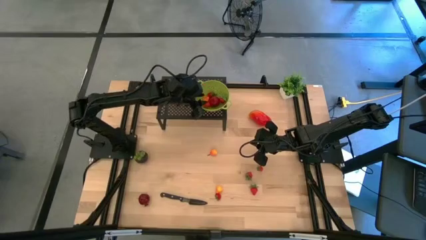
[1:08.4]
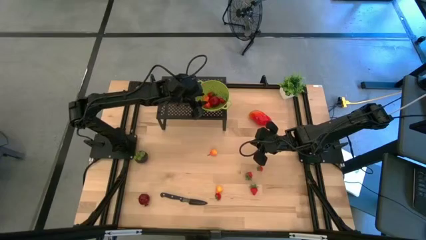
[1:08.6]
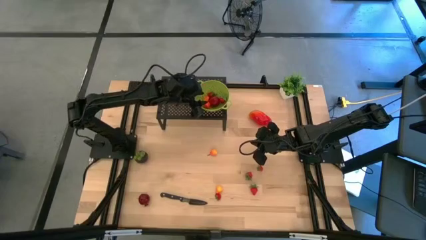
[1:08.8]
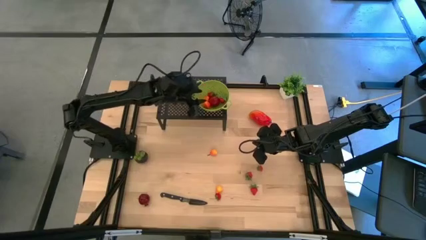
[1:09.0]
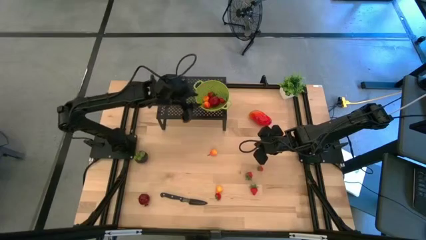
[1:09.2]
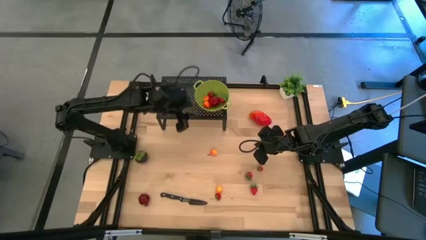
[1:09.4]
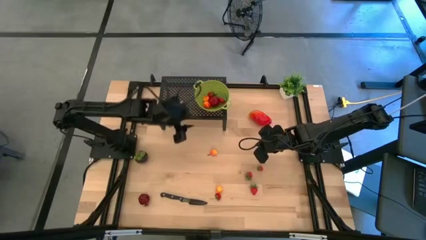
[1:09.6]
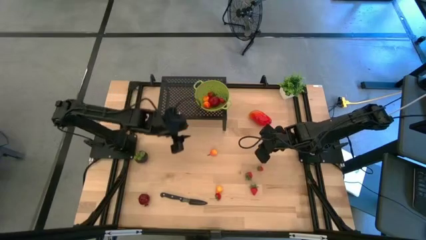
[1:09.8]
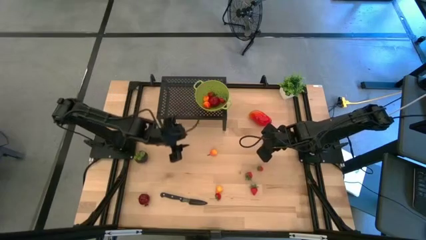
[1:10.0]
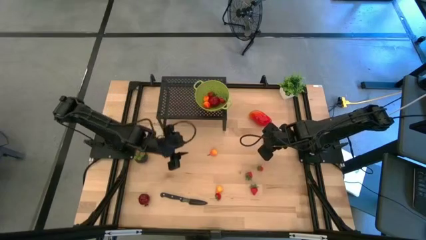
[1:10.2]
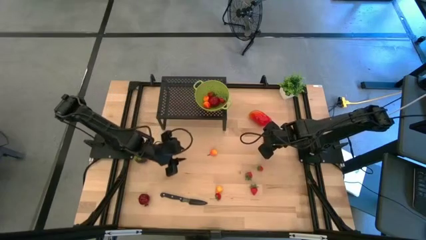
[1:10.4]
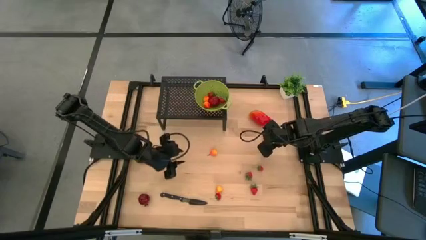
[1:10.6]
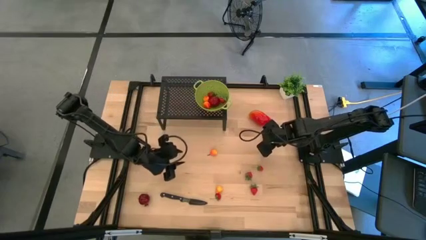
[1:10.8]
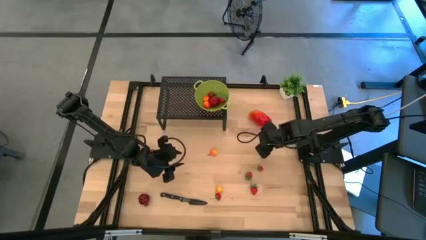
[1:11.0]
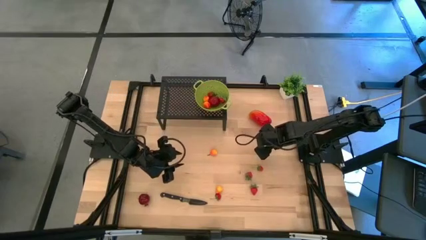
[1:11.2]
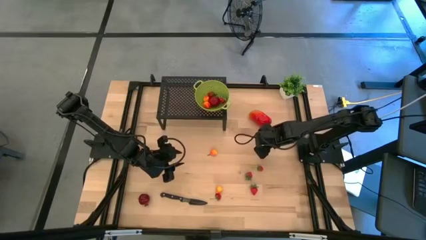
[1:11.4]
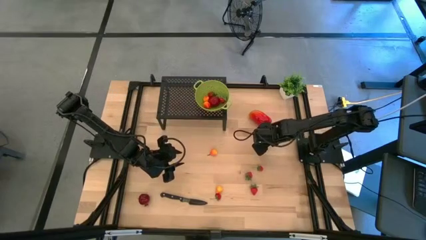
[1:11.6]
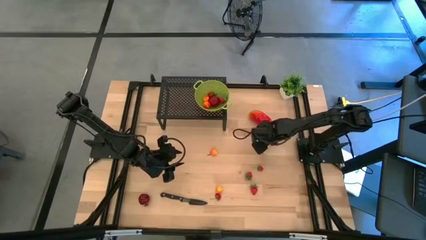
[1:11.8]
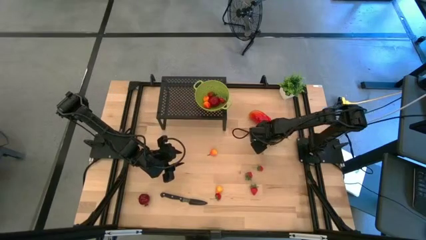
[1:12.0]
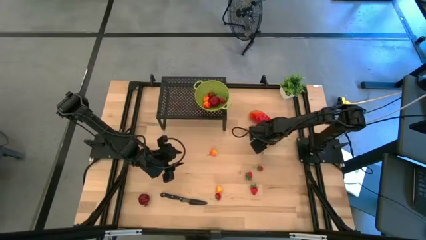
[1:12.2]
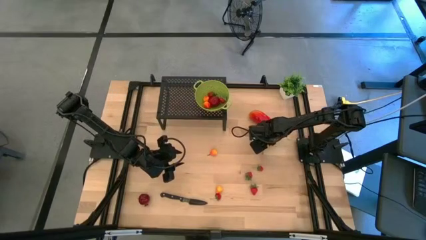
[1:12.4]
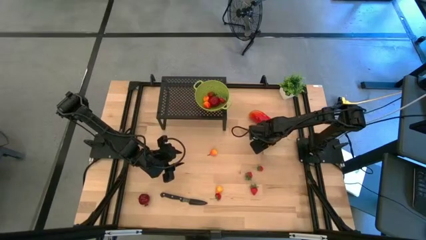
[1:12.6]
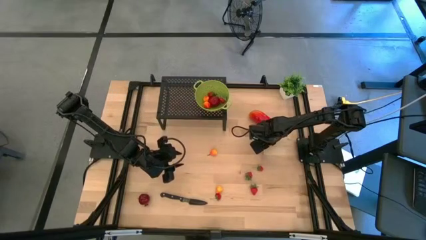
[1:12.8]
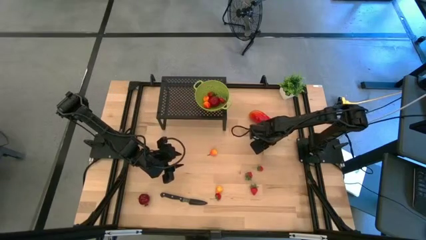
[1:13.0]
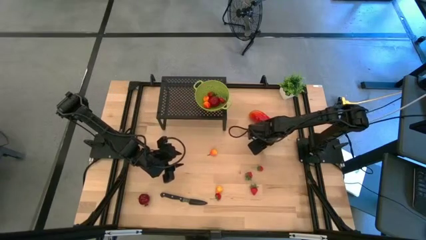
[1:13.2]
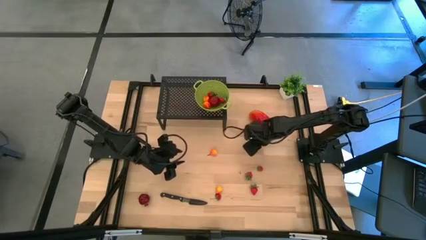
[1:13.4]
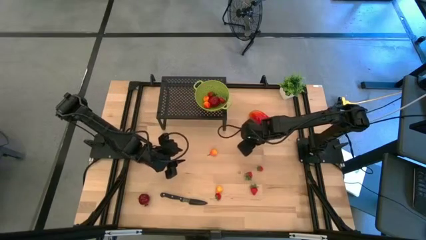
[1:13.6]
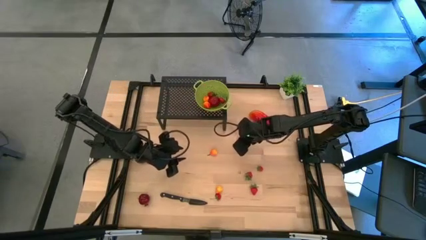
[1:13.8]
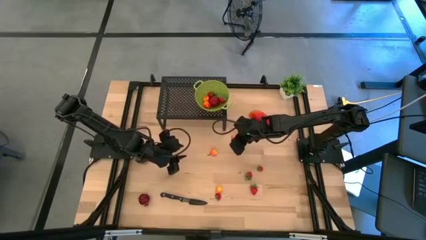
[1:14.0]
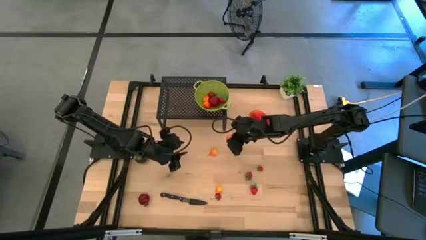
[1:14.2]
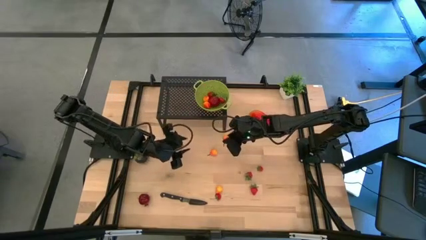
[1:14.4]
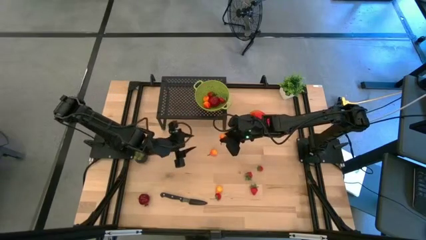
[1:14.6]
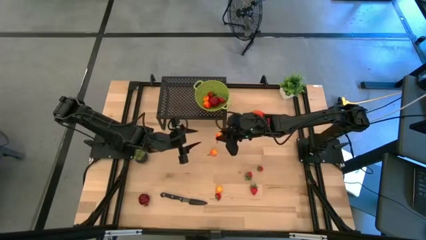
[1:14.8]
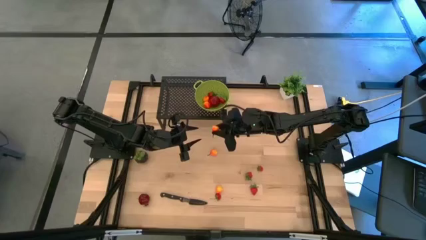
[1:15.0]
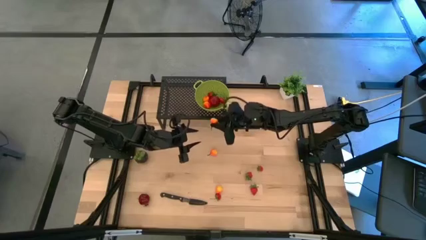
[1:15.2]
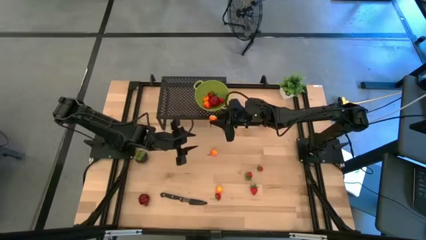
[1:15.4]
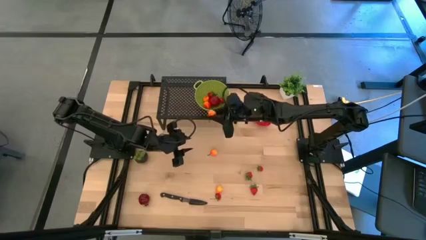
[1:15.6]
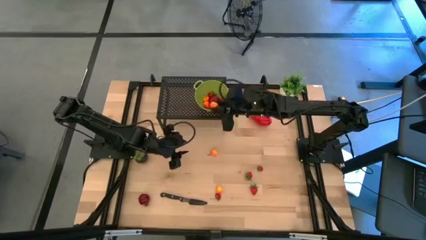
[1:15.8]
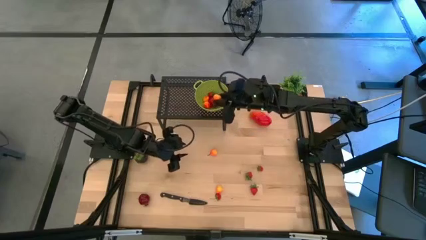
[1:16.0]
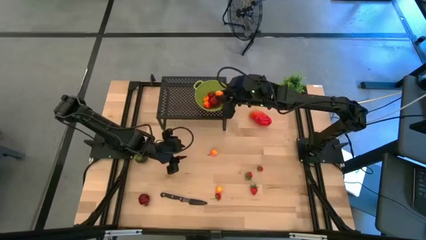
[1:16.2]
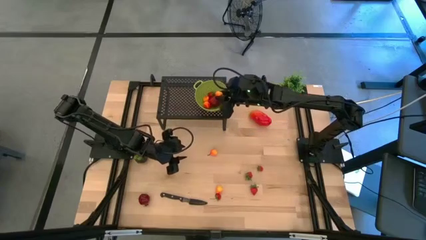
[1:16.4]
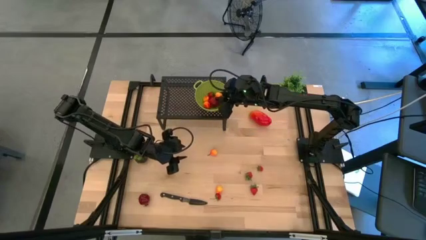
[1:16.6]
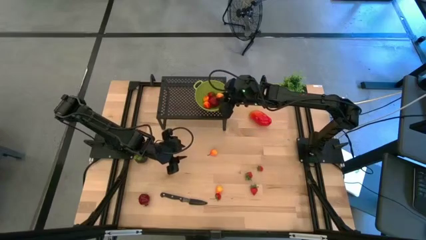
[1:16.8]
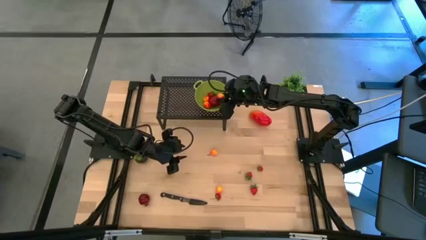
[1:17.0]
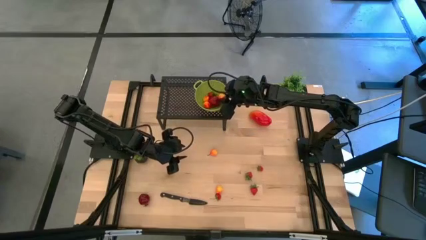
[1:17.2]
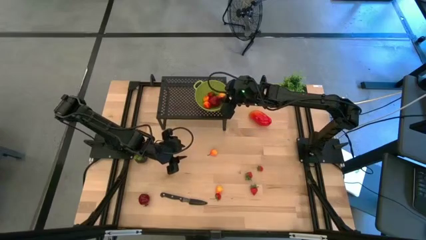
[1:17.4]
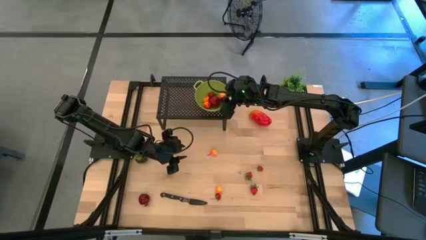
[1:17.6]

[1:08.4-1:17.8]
Task: Pick & Place Fruit
Put the pear into the green strainer bowl on the shelf

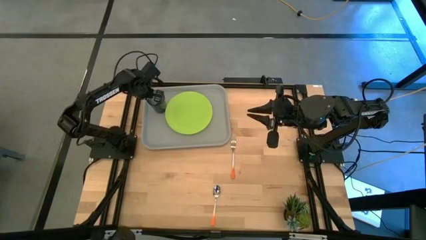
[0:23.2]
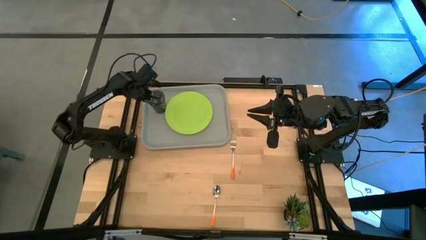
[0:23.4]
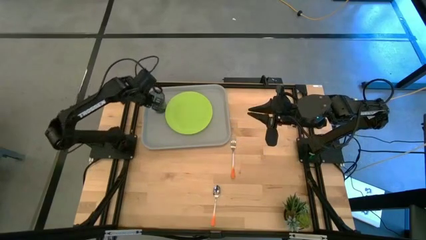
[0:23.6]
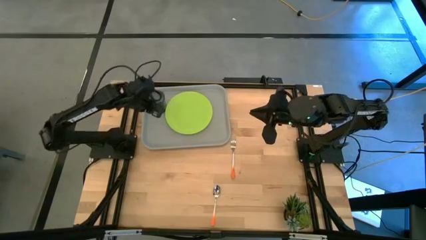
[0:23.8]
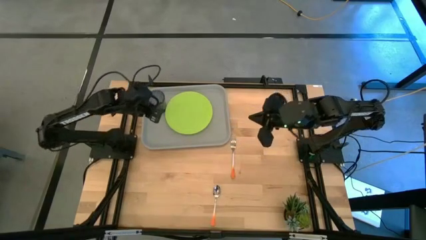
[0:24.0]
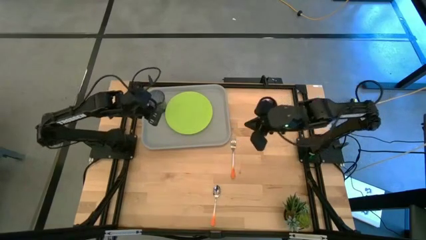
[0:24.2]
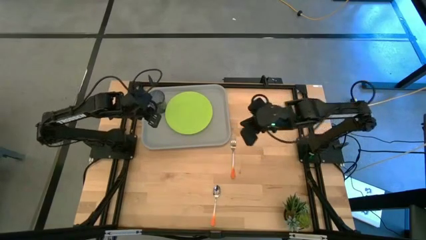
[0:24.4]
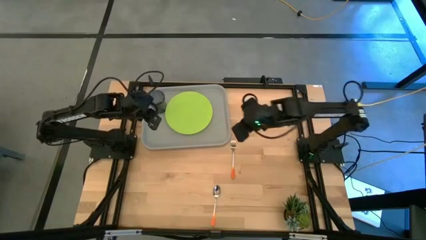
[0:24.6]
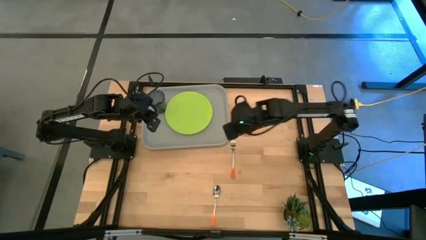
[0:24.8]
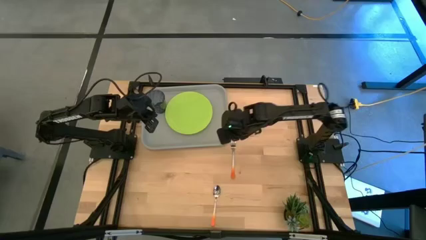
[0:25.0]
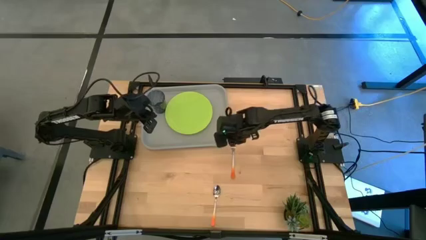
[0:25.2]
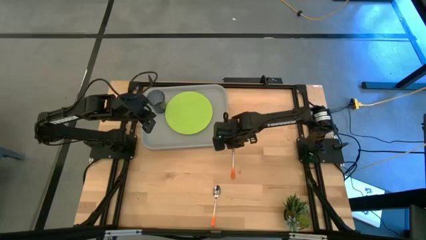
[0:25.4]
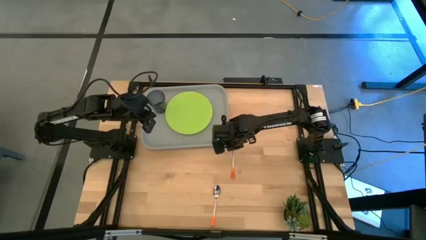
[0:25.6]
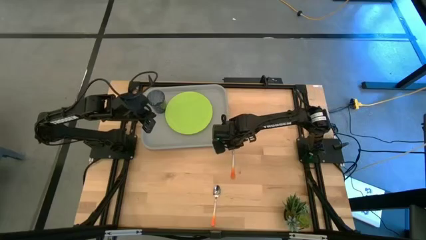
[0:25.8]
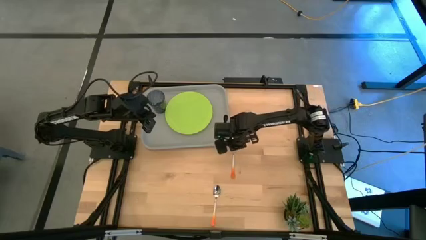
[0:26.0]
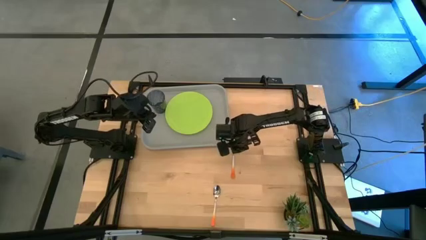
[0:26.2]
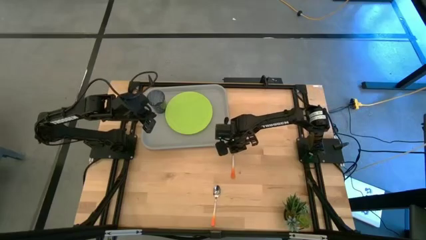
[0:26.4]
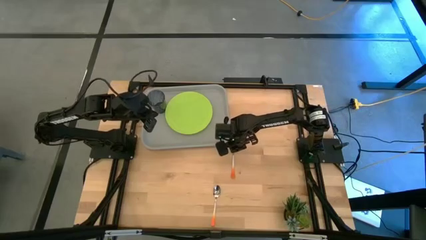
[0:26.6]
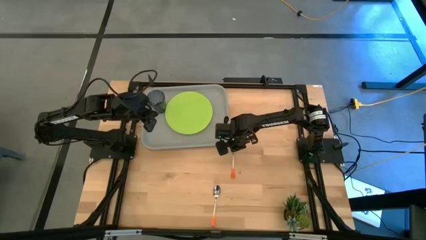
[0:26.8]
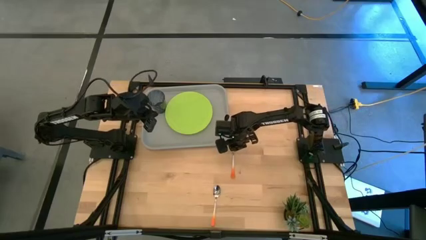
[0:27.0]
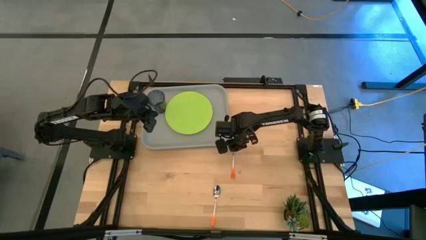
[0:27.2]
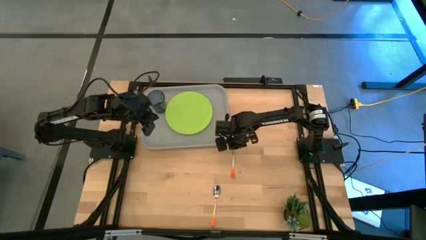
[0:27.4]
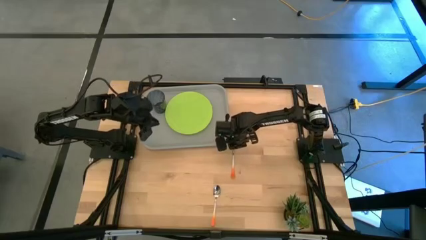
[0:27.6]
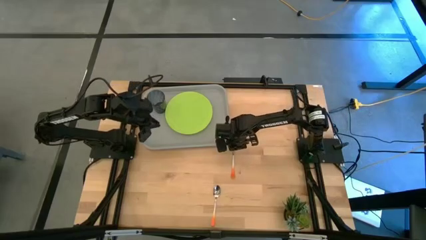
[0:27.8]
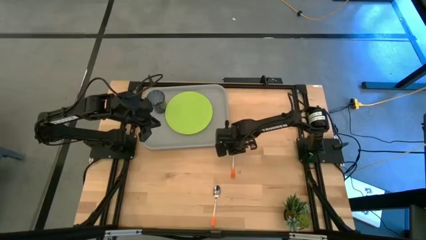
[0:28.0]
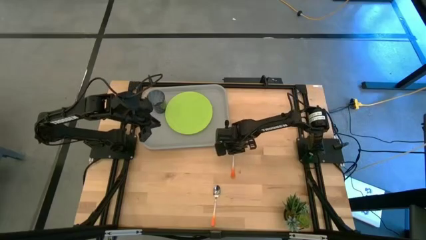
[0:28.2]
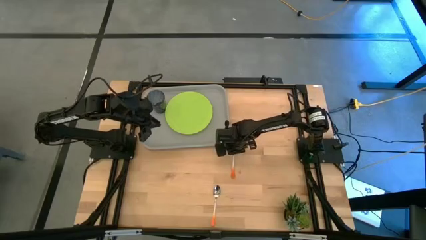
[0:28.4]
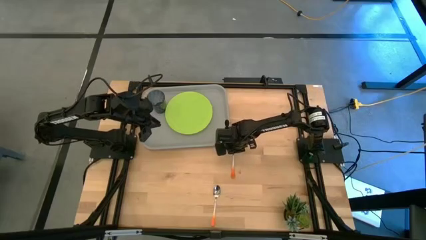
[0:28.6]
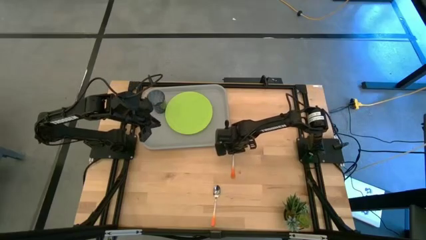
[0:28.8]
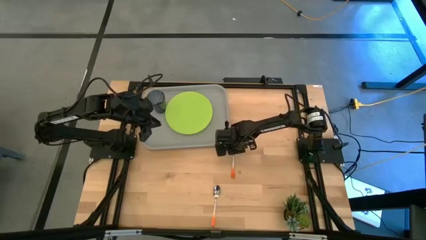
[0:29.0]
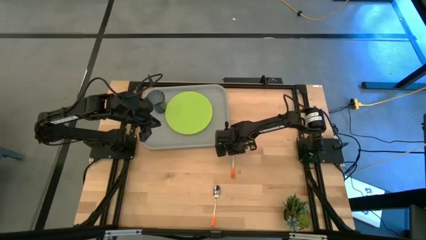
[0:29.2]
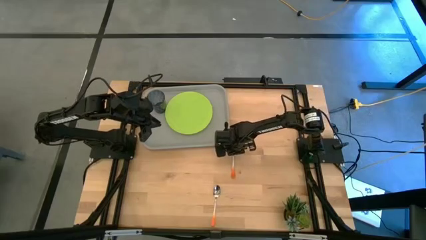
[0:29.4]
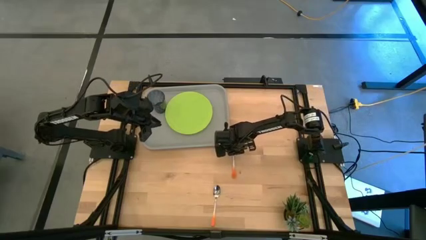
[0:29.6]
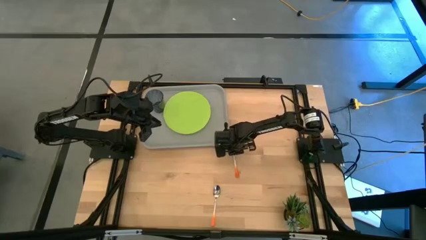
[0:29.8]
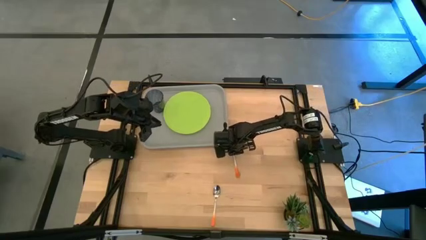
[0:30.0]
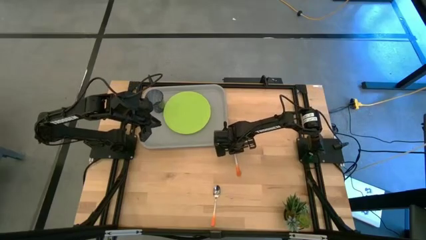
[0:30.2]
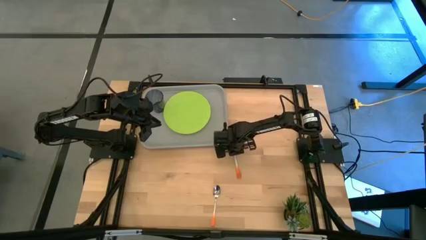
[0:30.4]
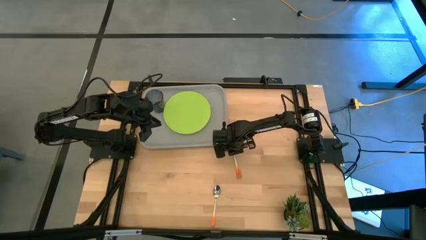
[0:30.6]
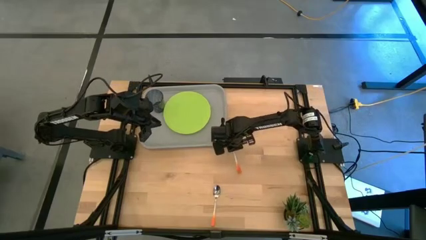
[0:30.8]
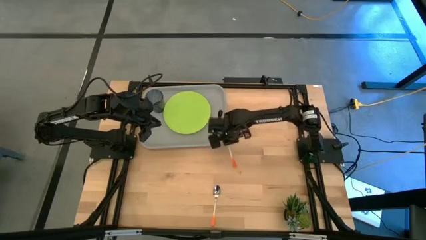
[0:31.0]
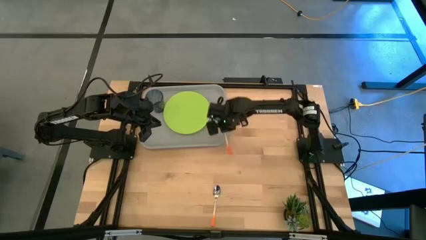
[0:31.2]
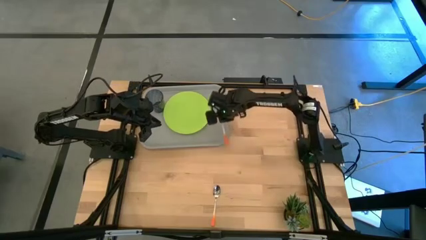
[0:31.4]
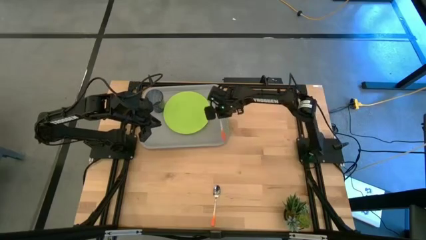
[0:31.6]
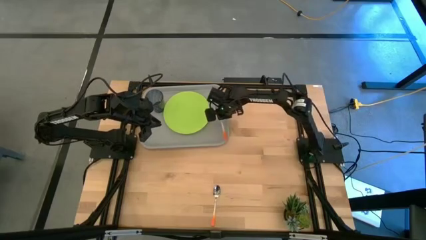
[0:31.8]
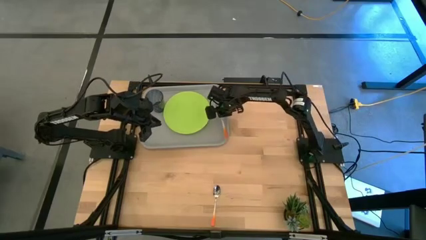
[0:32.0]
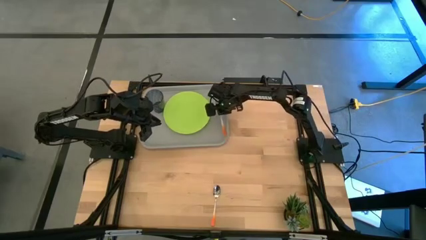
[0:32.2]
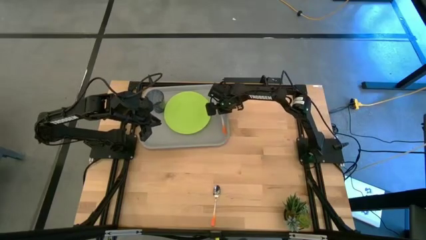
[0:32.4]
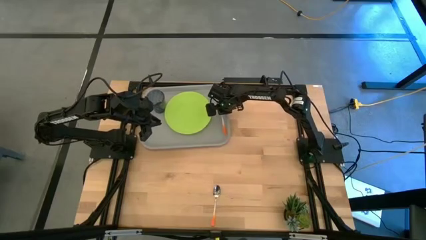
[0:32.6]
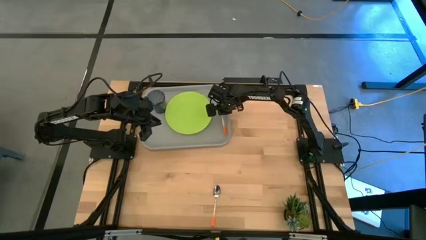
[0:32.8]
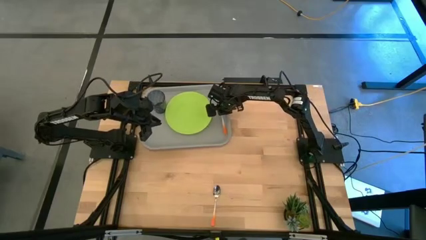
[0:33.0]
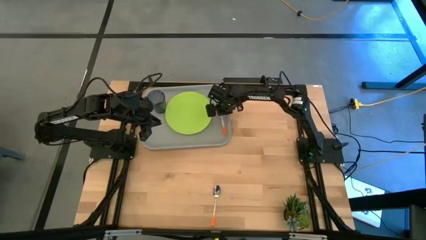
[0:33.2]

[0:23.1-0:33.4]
Task: Pick and place plate/cup/fork/spoon on tray
Put the orange fork on the gray tray to the right of the green plate
